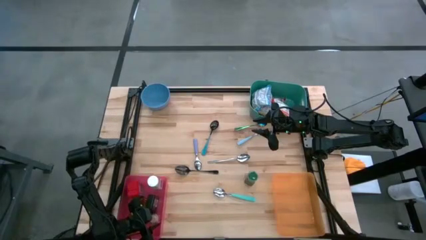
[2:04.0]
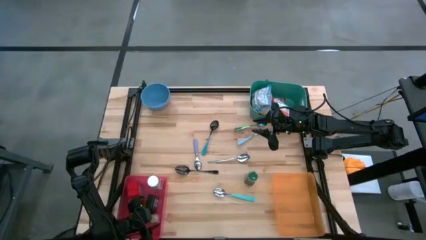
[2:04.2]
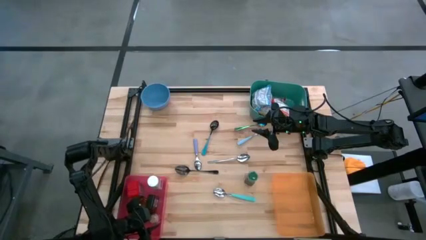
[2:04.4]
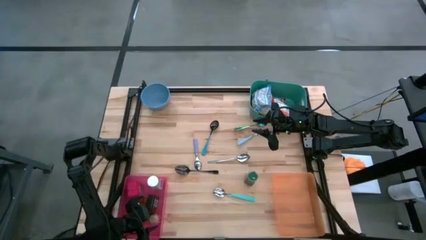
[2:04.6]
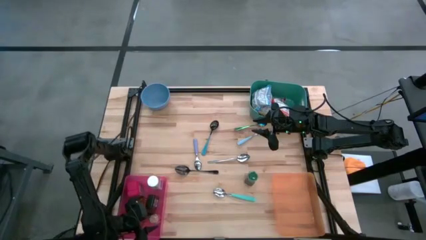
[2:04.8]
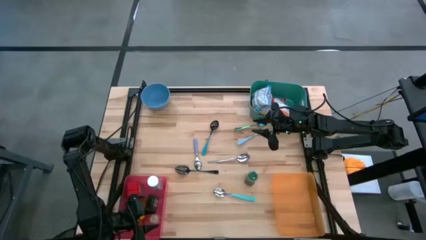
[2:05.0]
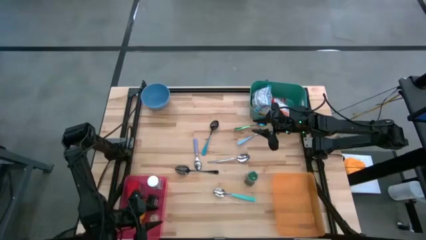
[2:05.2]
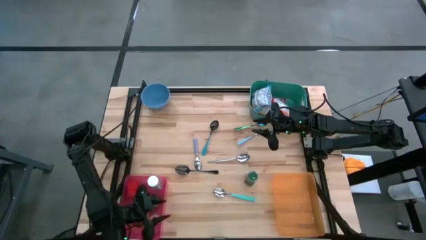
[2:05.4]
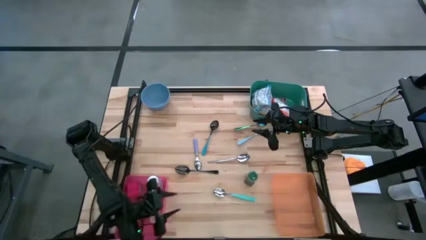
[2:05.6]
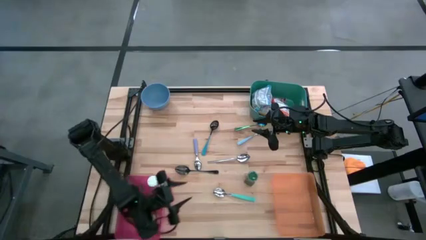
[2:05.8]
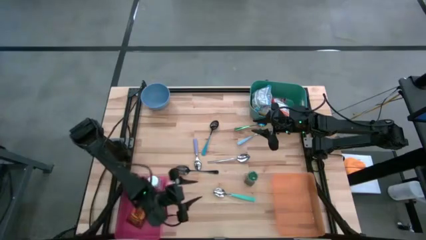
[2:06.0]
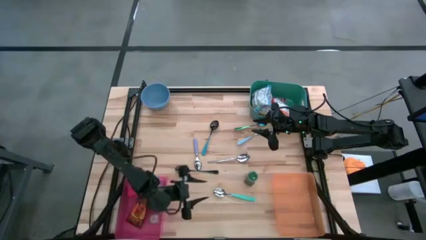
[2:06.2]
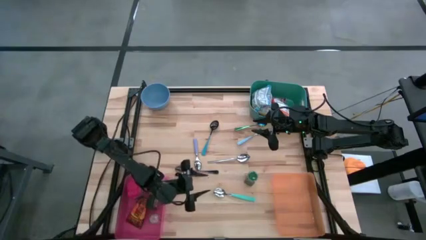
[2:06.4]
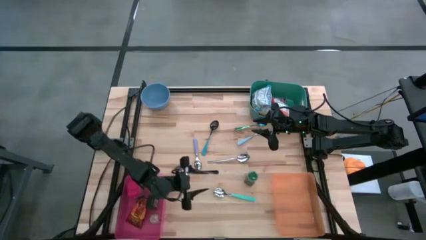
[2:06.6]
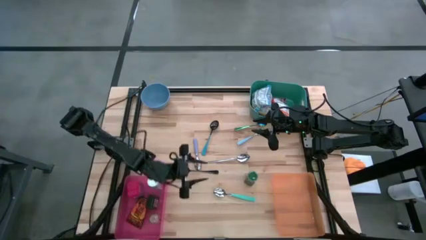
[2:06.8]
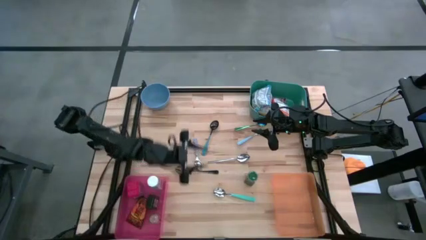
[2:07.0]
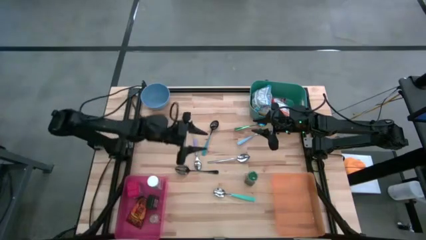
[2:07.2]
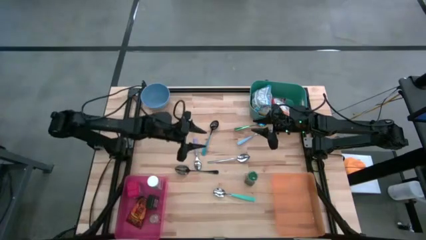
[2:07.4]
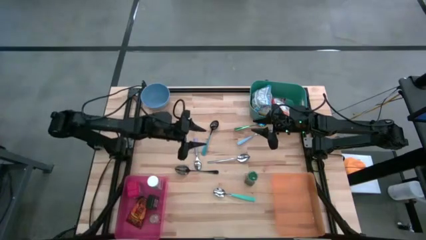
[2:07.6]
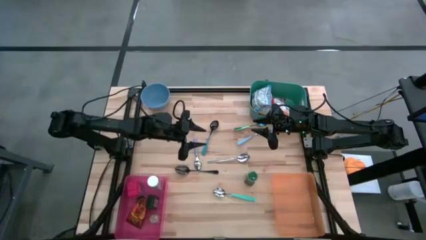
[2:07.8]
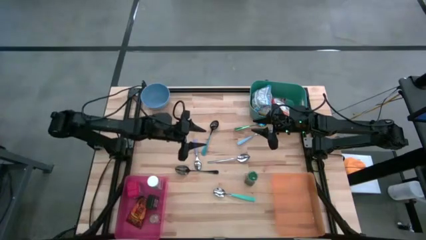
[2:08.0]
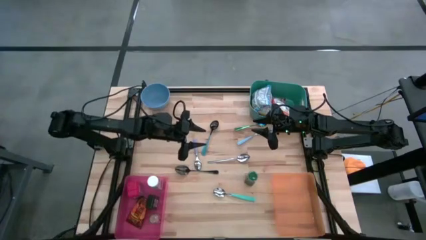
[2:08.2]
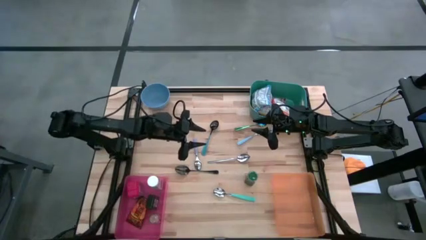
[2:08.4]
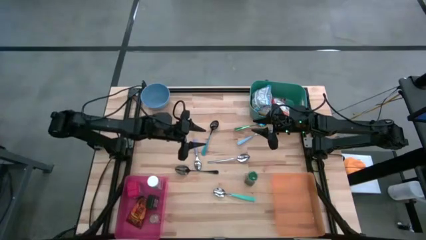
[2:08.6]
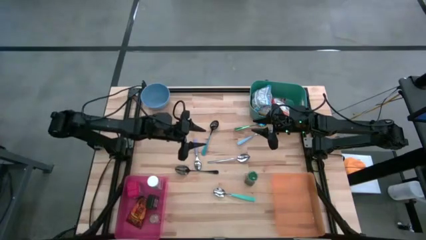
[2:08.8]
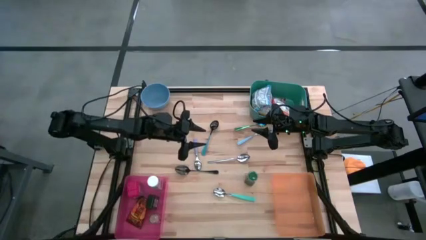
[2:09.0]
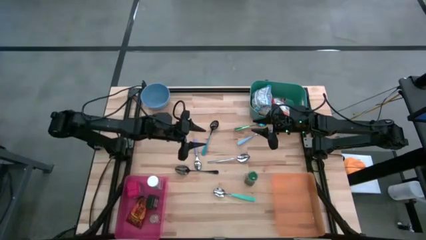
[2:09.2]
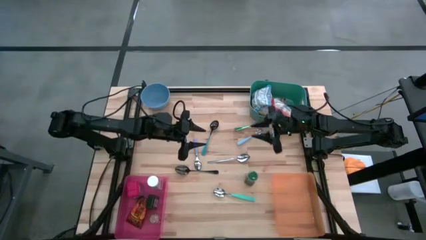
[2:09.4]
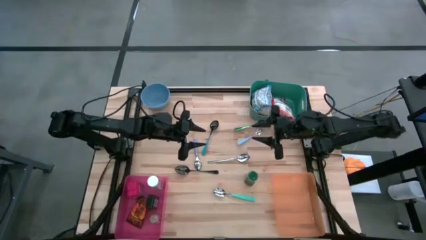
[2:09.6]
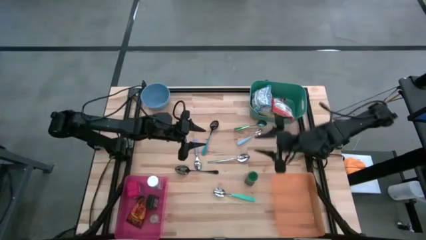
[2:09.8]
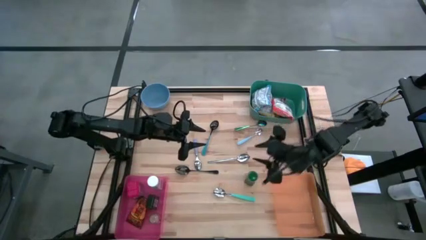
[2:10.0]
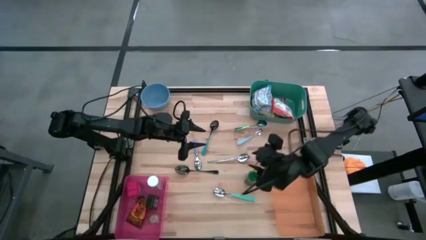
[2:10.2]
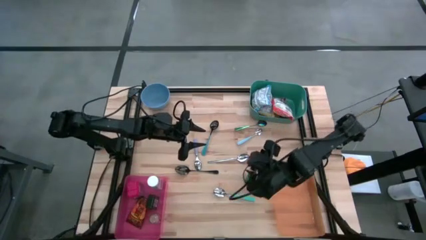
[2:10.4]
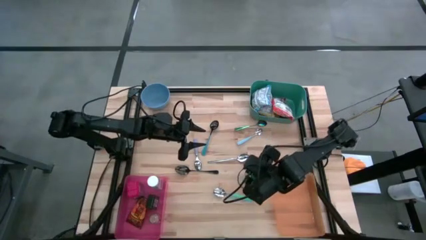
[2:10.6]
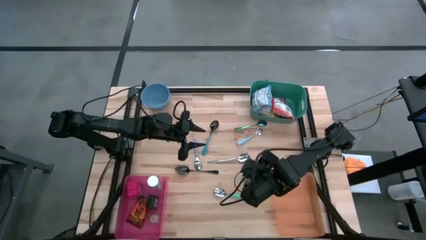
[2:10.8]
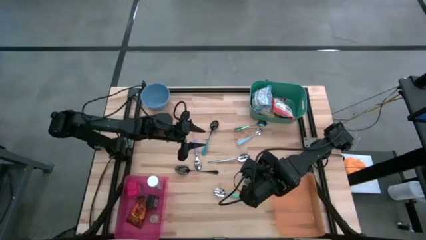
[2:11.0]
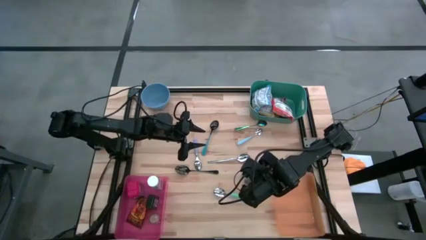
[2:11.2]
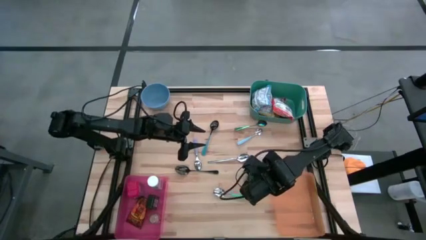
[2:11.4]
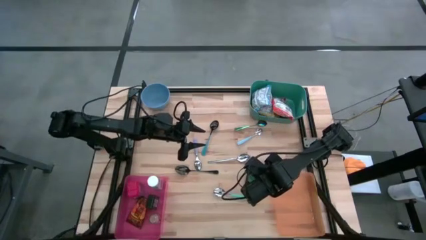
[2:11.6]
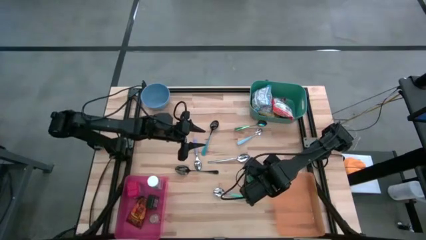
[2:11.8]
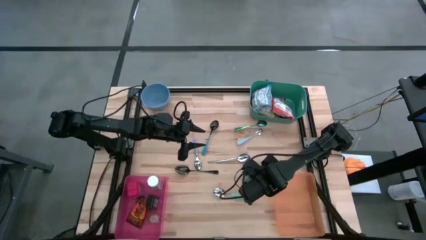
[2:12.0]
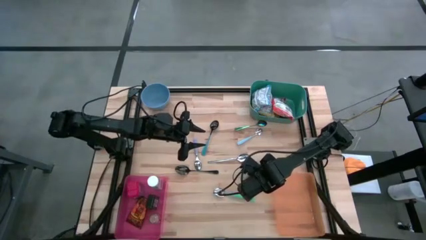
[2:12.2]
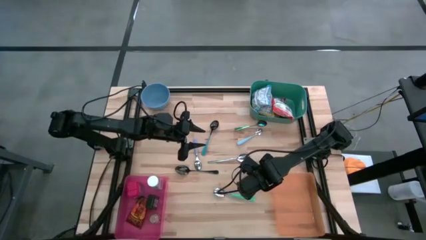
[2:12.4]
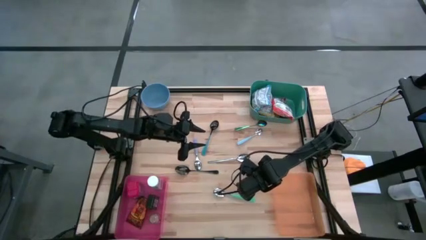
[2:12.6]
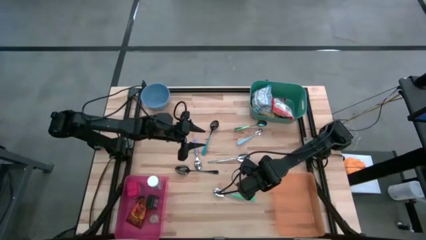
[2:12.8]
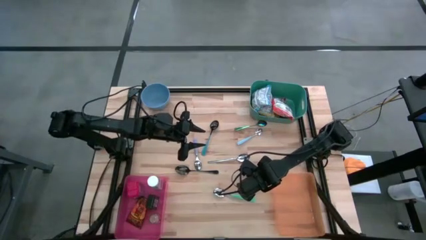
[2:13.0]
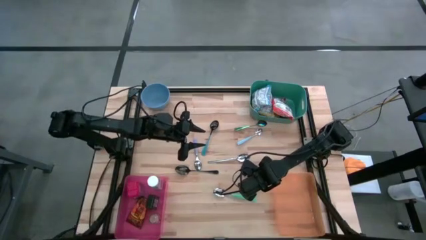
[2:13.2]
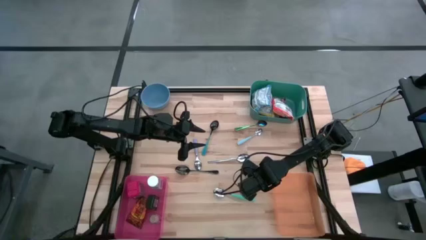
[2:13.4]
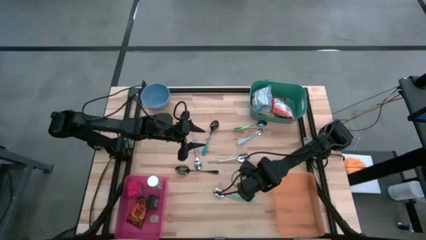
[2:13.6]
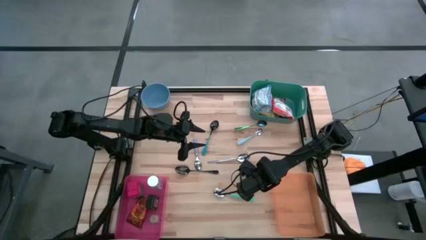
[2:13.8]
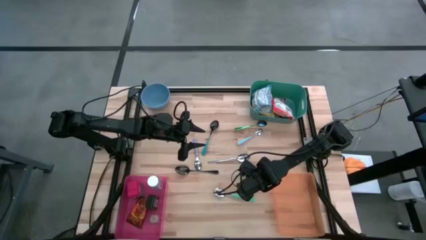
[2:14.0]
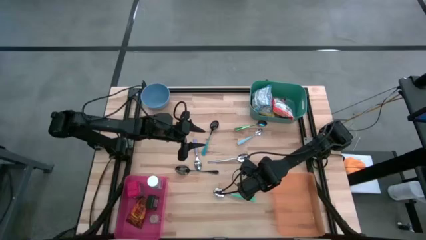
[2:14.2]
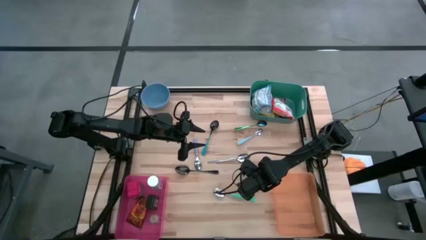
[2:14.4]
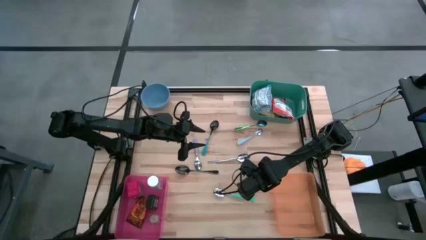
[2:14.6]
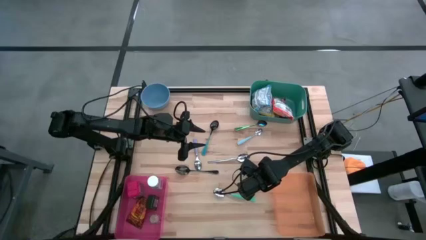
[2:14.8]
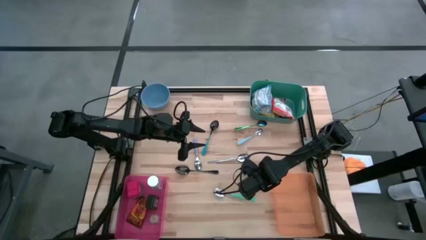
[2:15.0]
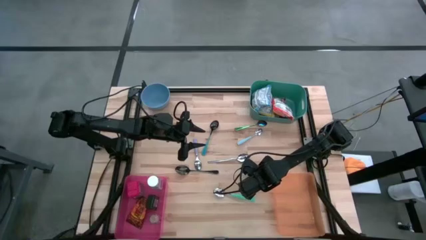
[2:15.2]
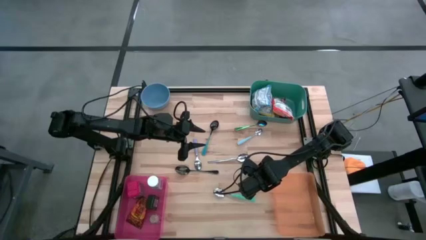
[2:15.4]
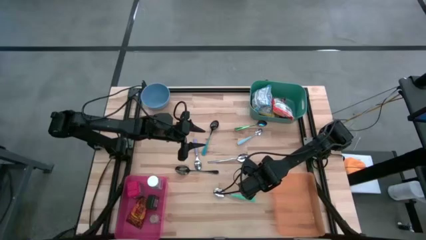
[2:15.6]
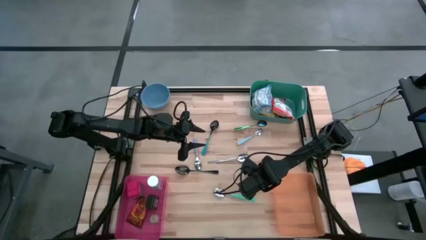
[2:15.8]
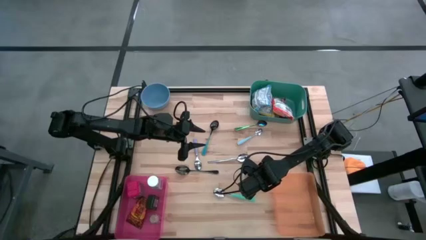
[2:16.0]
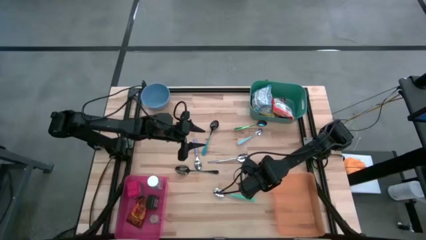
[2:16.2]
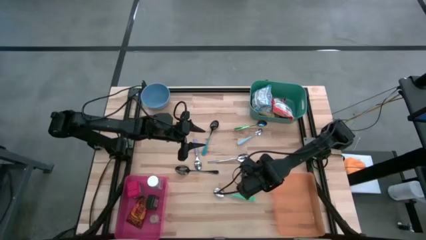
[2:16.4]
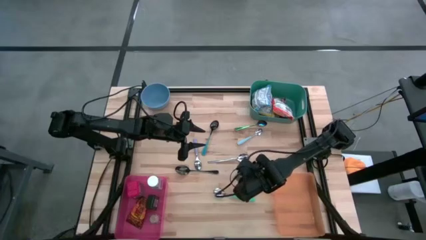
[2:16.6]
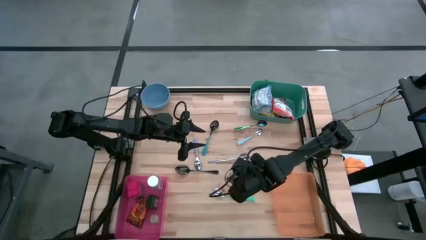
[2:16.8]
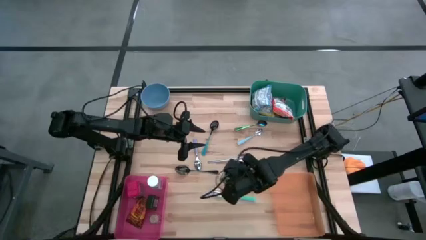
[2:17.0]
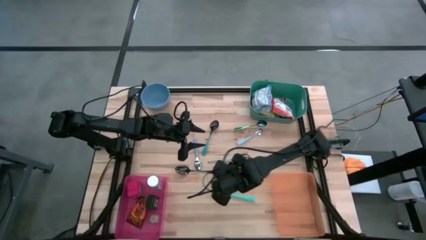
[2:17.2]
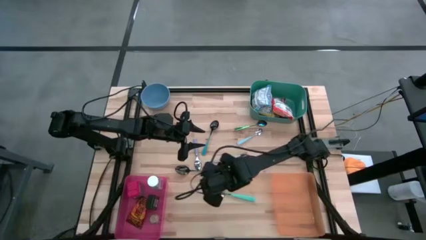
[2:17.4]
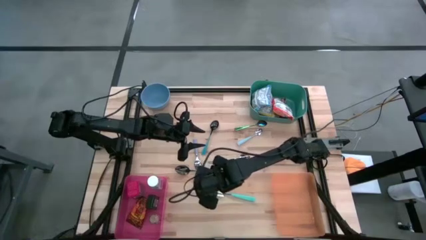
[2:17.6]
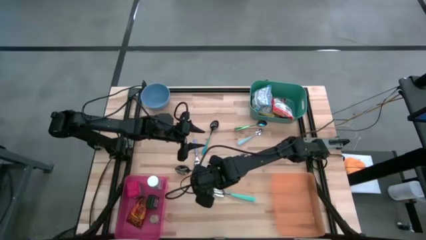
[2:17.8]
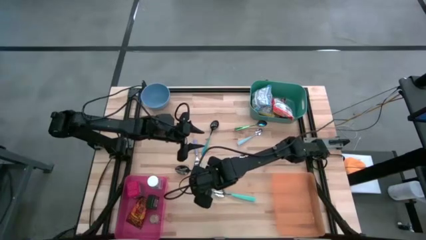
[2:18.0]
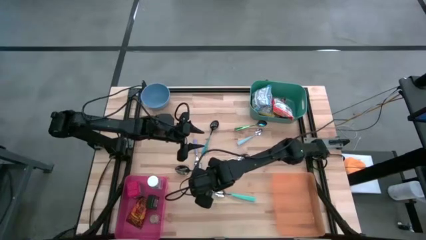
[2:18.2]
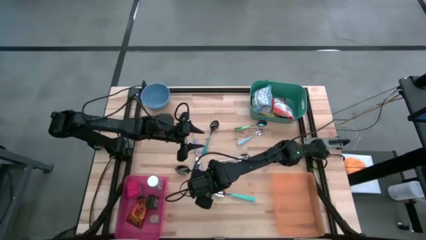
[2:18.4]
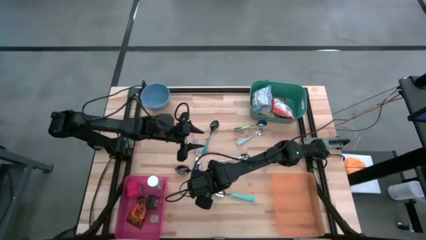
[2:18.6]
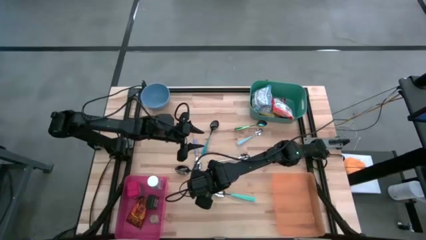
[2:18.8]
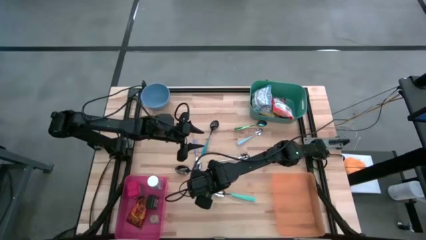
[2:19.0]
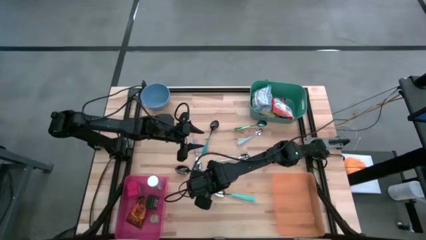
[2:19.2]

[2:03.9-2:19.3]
Put the green seasoning bottle into the pink bin
